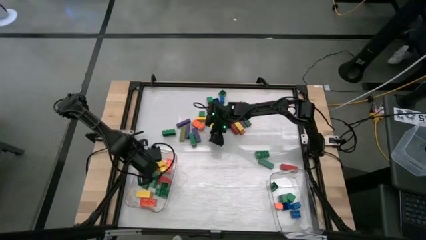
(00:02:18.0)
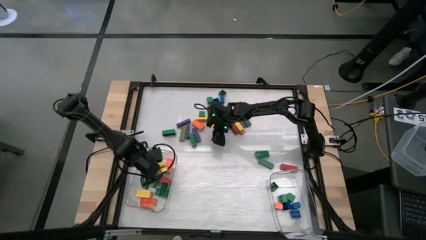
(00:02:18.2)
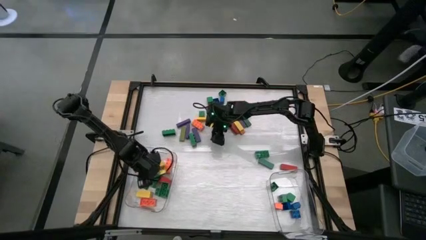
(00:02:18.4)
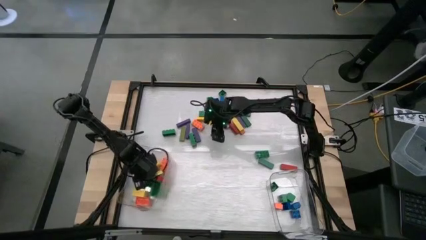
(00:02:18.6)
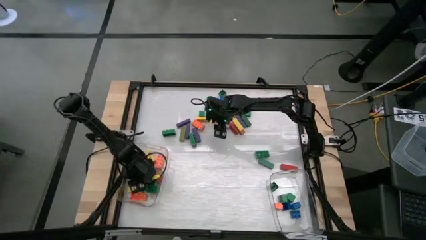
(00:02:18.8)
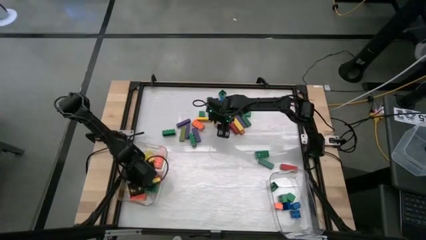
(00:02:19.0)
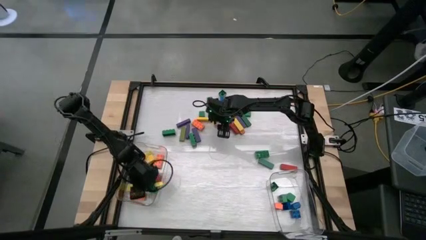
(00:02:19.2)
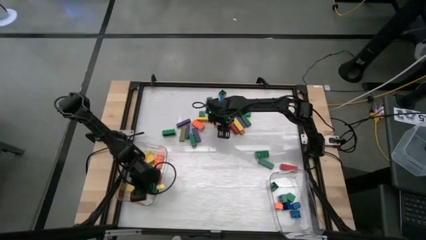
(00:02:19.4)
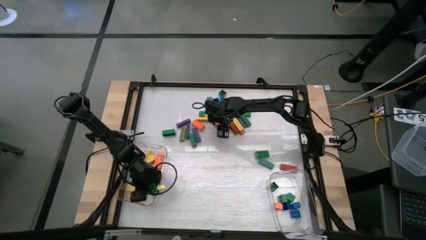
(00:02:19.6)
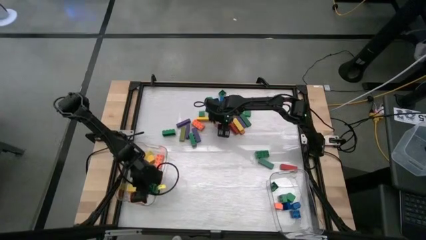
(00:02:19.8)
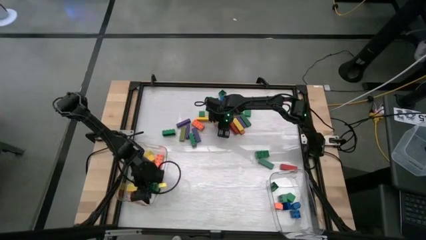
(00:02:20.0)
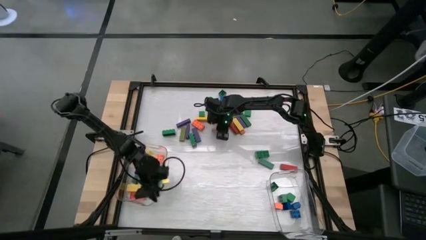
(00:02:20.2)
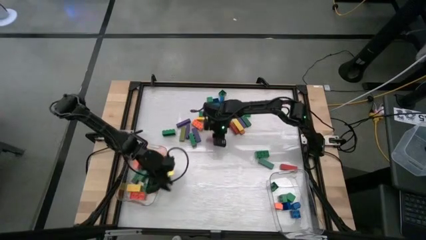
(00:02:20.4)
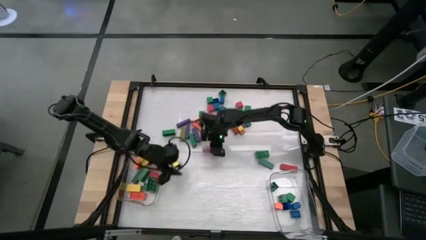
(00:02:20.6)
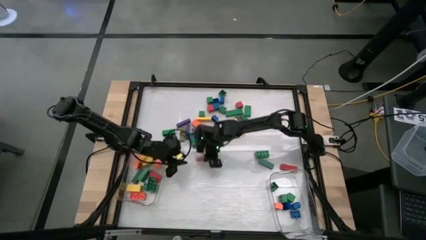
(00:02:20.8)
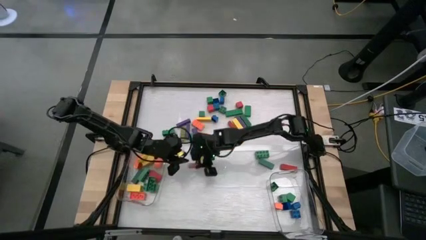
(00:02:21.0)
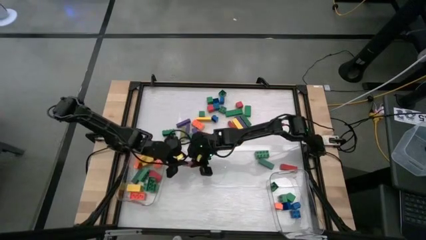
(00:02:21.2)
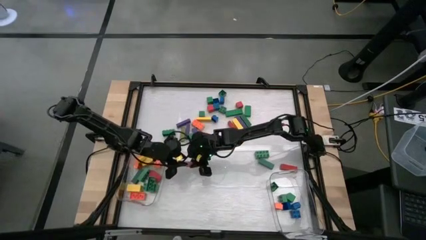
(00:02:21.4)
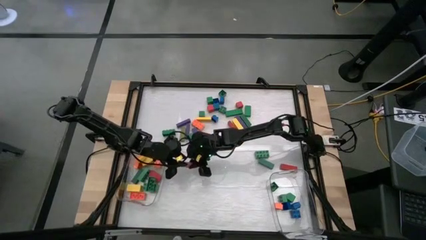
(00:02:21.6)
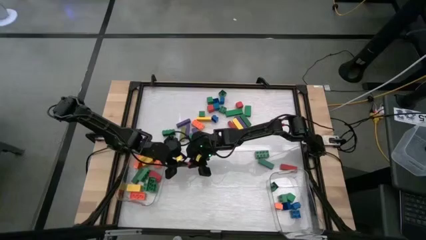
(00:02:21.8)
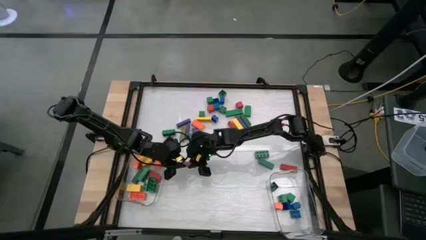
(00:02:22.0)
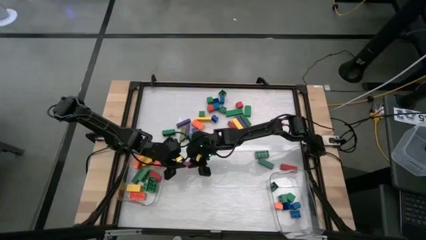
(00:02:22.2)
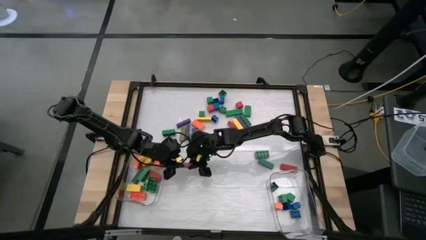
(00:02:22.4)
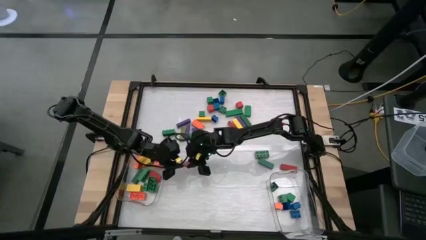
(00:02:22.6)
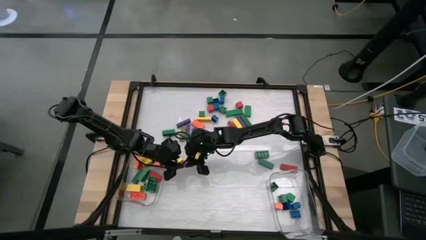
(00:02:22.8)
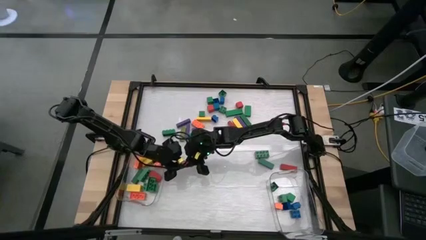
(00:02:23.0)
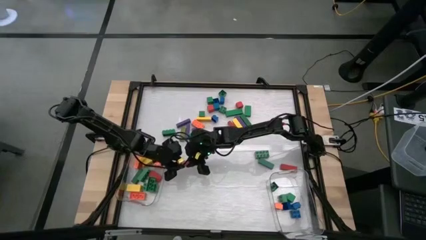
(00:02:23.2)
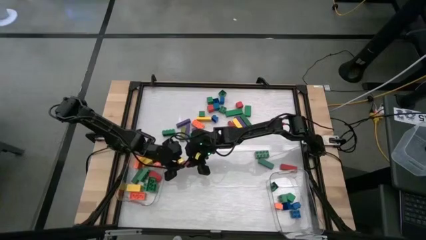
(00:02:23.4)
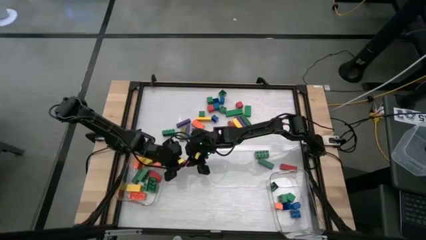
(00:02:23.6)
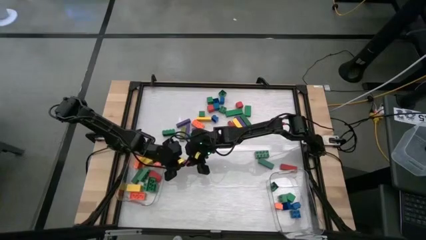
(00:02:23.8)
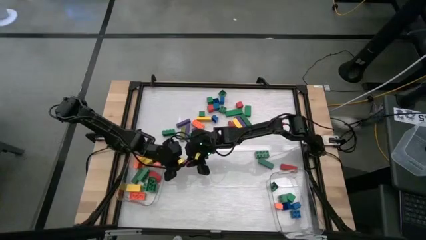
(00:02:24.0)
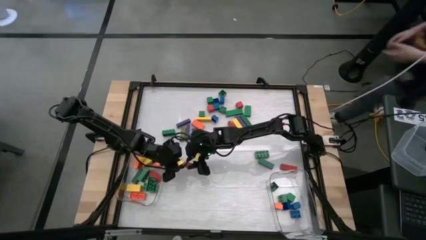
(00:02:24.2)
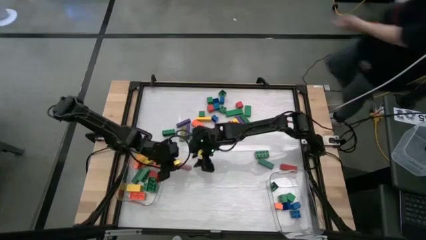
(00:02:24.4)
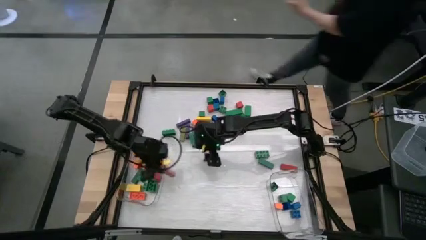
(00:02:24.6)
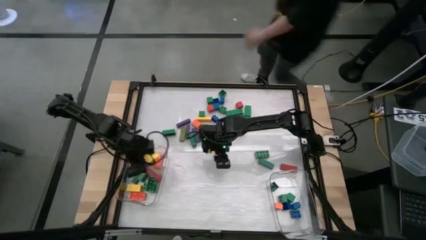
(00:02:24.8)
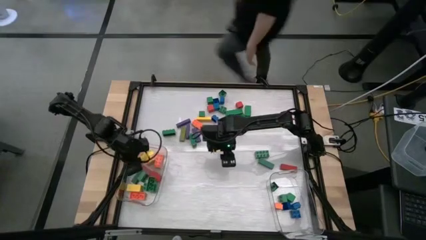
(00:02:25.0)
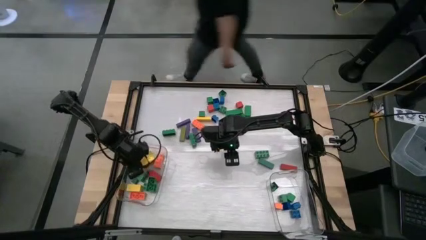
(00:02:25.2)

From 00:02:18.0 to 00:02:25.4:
Task: Sort blocks by size
Put the large pink wooden block into the left transparent bin

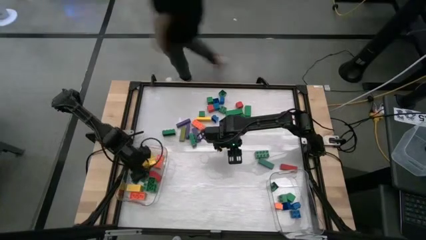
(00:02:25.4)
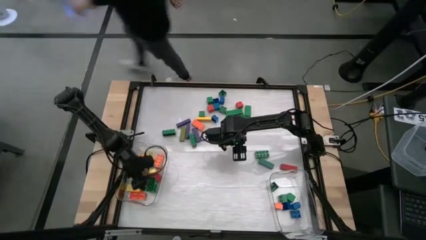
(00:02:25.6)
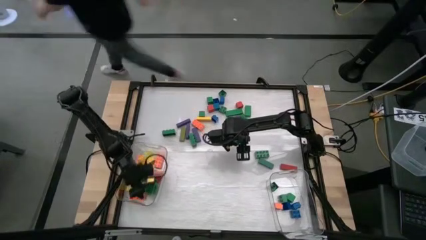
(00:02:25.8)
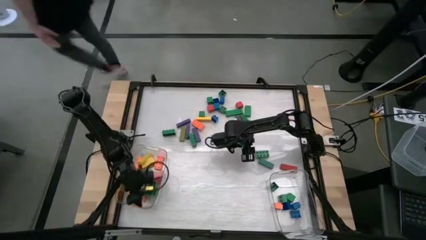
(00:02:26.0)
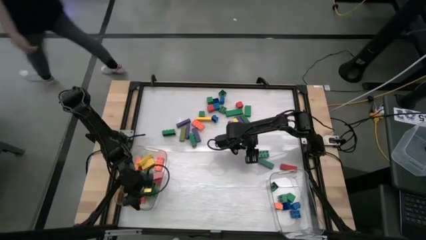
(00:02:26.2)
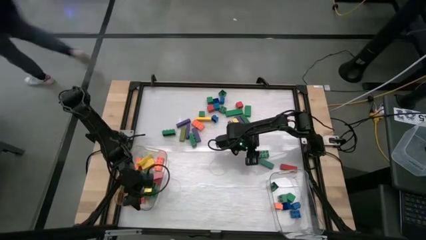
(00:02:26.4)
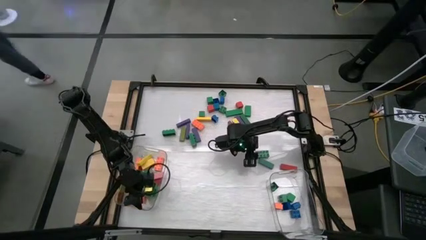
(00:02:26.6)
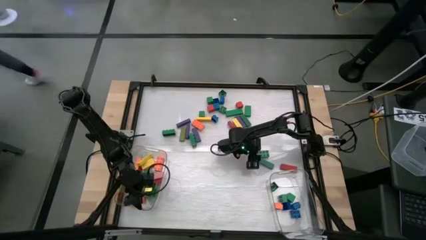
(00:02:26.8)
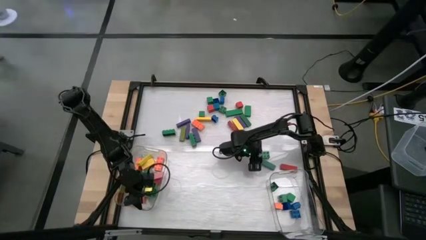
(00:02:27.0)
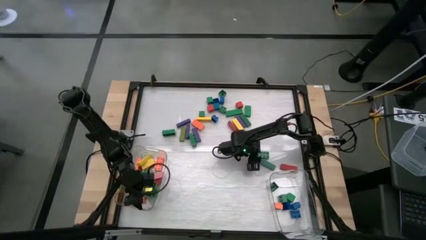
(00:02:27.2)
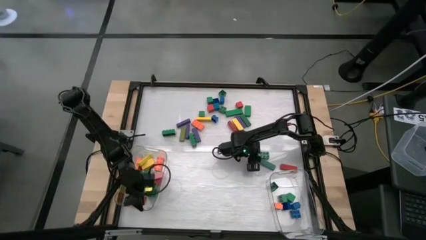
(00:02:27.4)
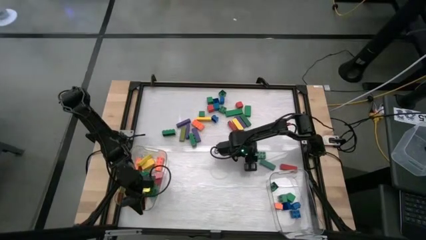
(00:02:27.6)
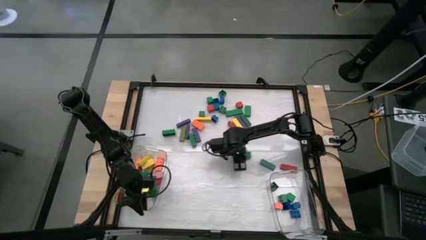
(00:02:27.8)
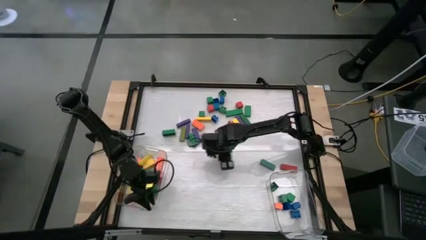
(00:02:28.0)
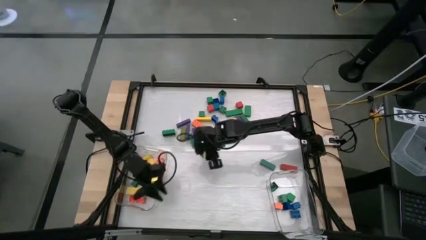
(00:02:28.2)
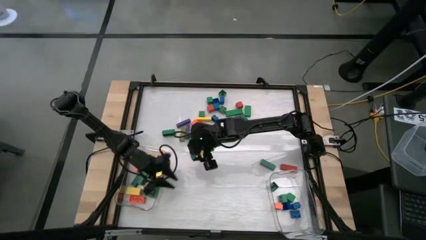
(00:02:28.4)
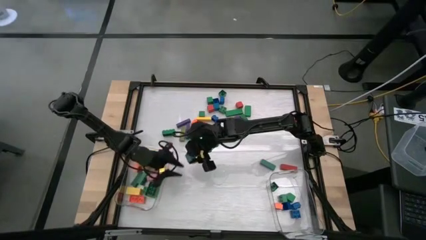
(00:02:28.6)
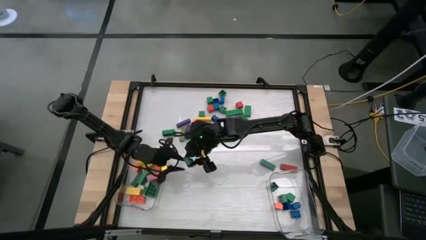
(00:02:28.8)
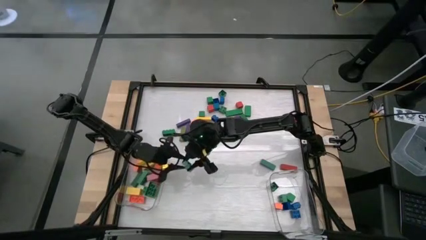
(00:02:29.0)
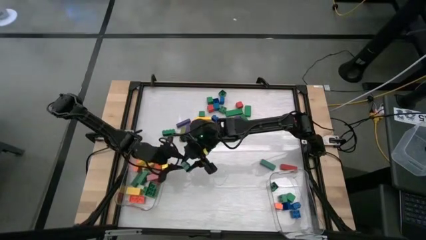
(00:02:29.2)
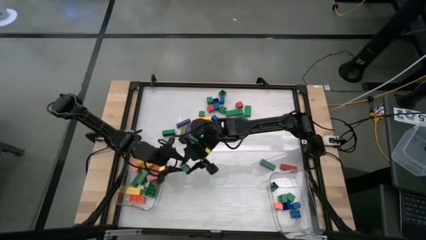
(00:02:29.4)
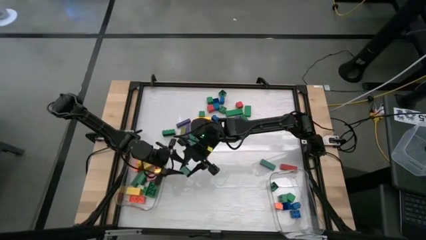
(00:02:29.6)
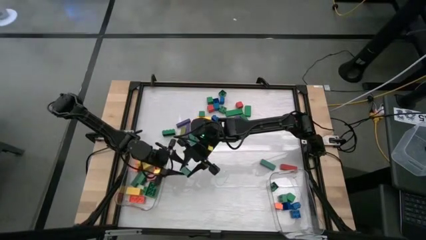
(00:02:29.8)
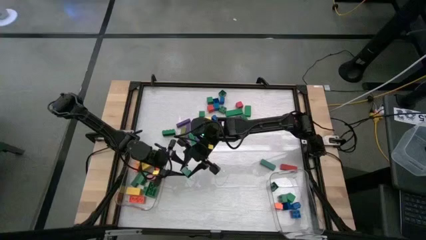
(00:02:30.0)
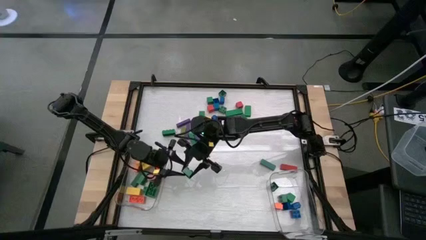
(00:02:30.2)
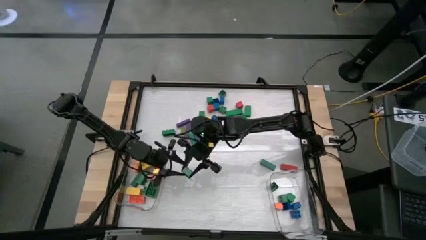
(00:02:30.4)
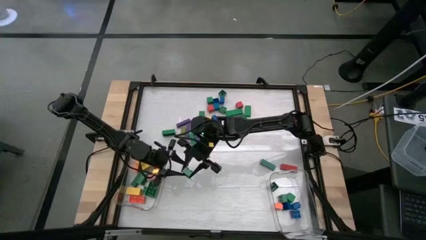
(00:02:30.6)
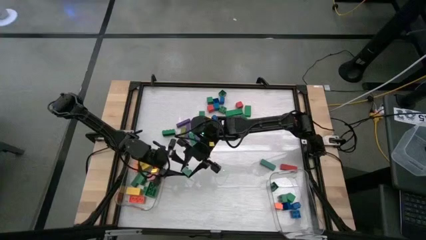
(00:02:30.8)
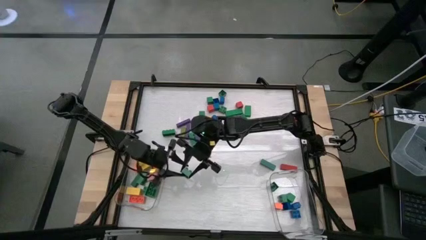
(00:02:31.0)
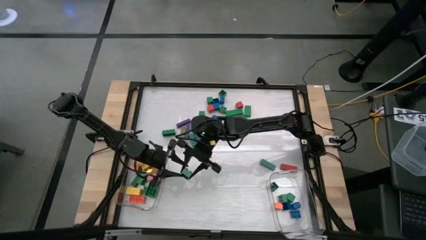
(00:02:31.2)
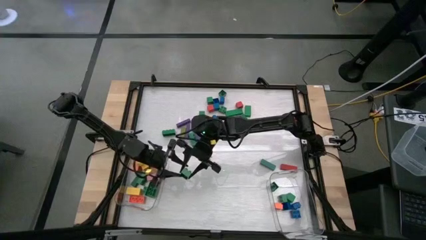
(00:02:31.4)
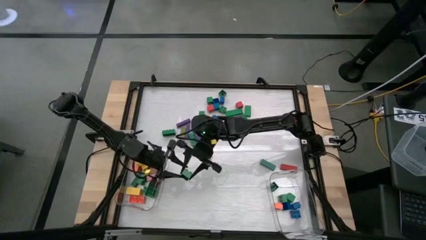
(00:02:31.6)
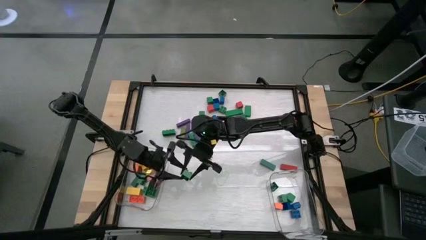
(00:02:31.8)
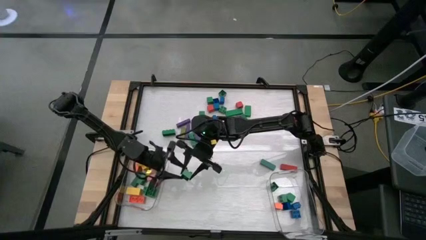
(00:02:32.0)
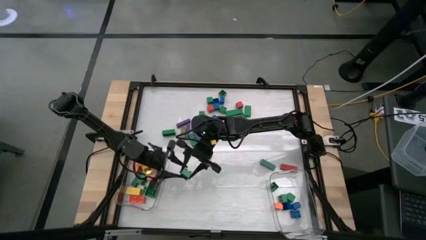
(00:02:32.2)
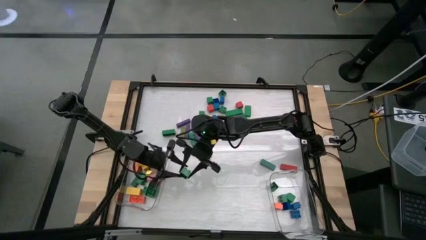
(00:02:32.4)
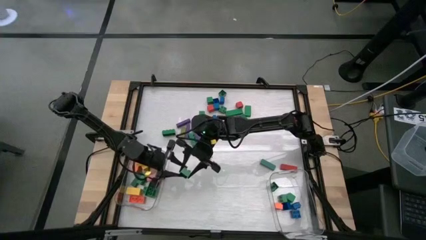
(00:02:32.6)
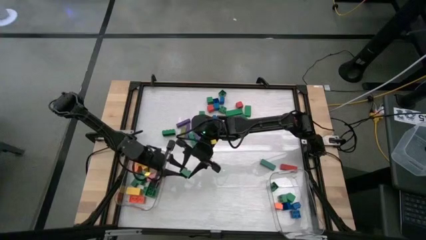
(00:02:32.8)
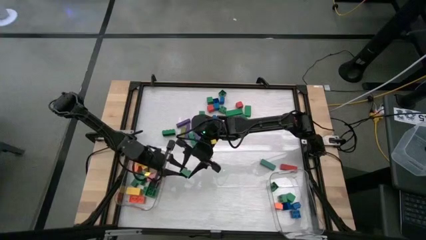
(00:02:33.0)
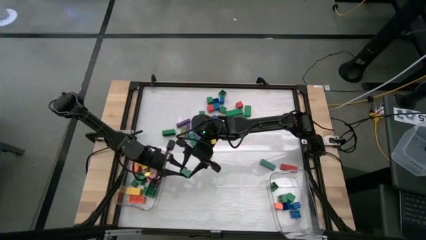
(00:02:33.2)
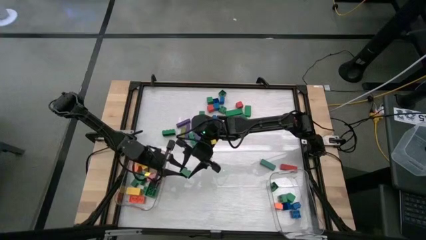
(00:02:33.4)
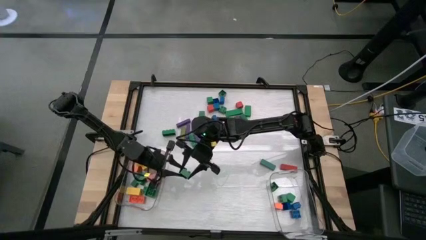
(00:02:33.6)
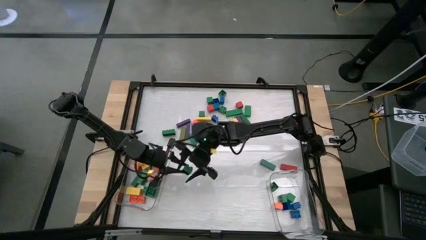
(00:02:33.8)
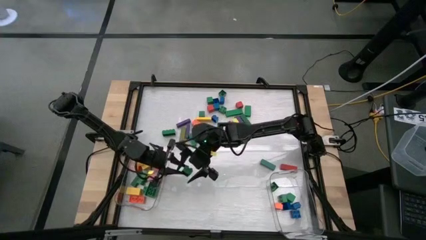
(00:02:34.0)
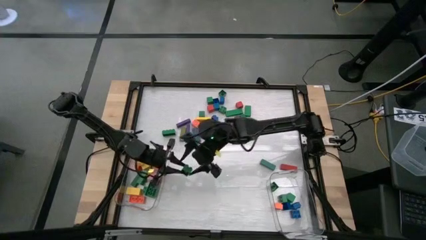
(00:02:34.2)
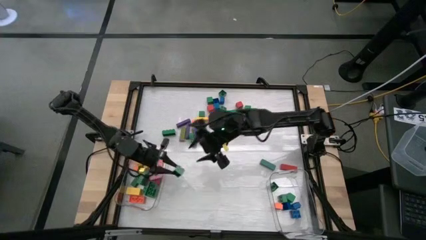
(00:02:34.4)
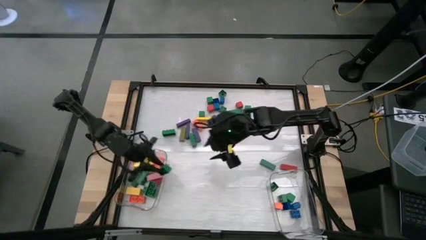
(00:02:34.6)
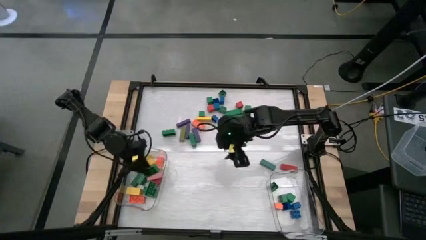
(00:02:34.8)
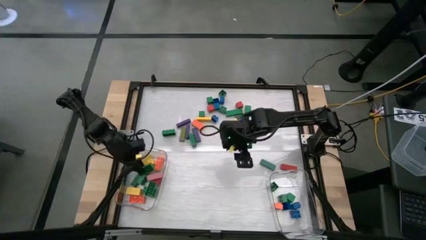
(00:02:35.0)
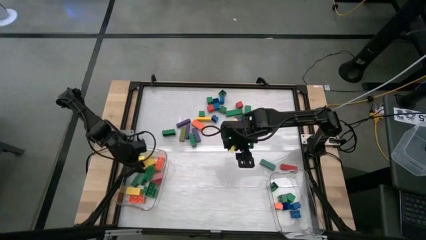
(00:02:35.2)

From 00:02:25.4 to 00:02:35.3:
Put the large green game piece into the left transparent bin
